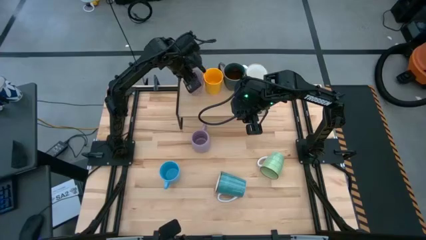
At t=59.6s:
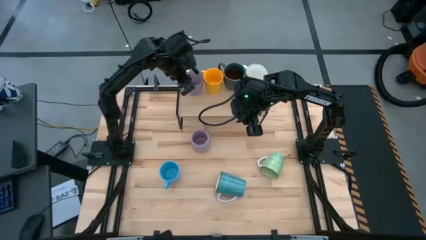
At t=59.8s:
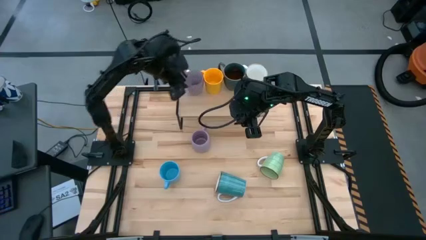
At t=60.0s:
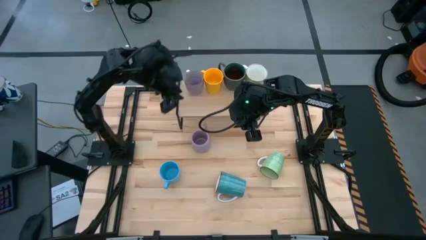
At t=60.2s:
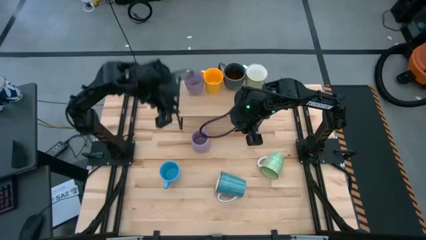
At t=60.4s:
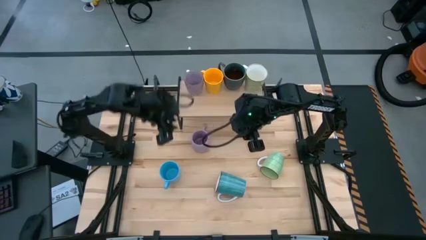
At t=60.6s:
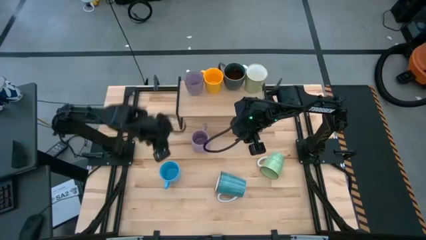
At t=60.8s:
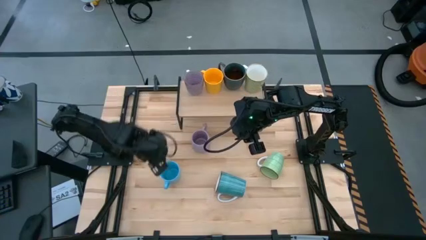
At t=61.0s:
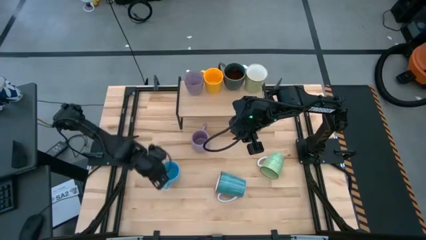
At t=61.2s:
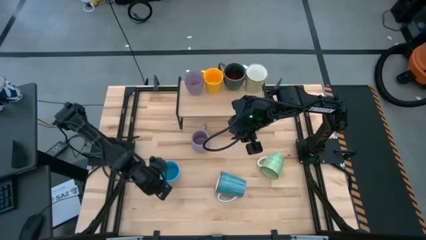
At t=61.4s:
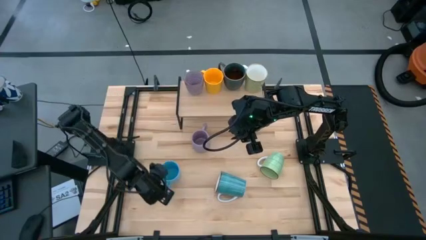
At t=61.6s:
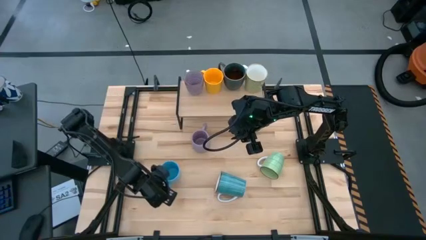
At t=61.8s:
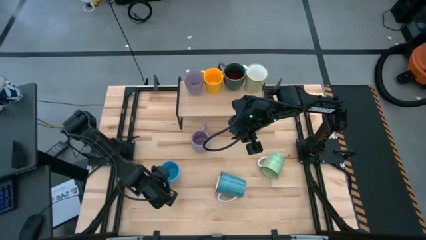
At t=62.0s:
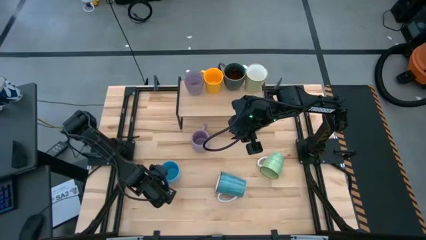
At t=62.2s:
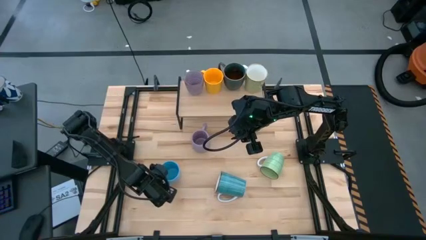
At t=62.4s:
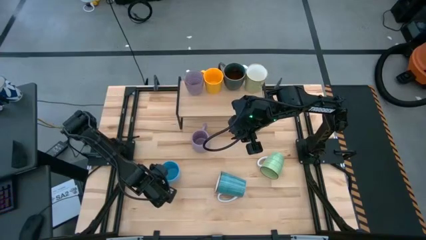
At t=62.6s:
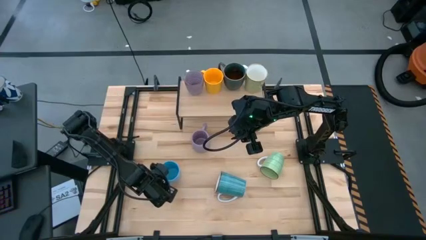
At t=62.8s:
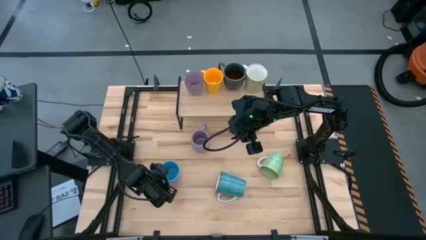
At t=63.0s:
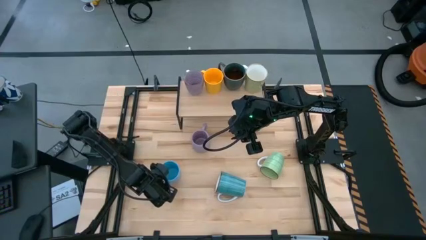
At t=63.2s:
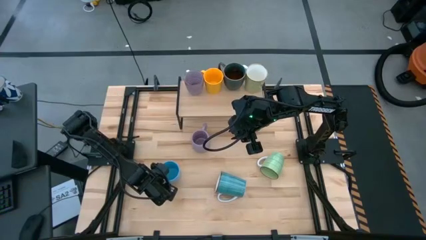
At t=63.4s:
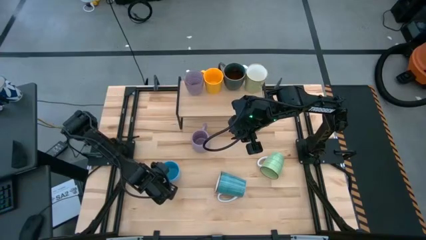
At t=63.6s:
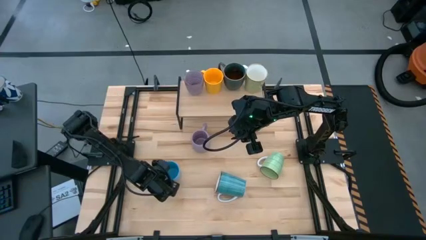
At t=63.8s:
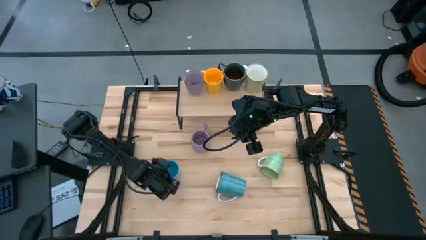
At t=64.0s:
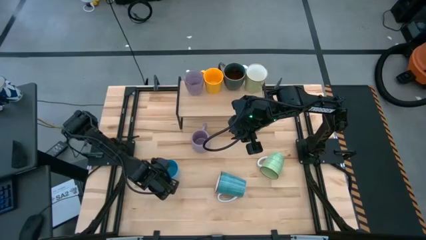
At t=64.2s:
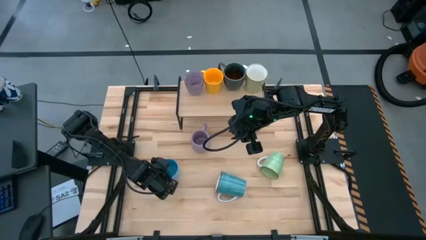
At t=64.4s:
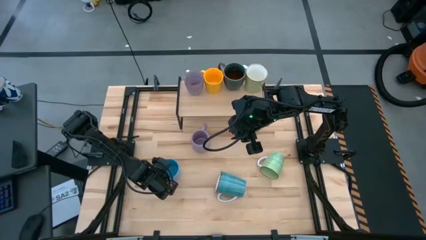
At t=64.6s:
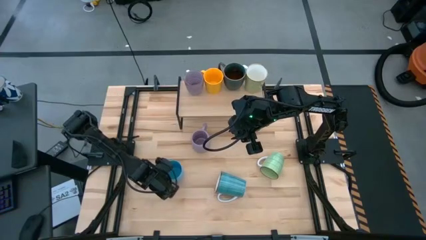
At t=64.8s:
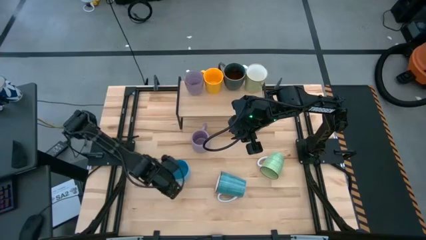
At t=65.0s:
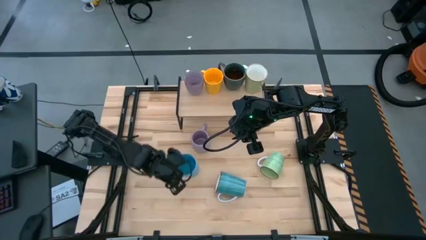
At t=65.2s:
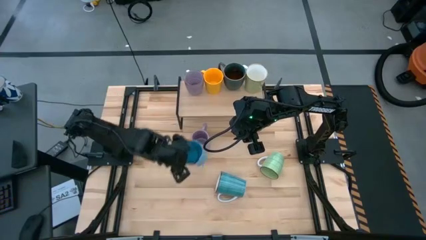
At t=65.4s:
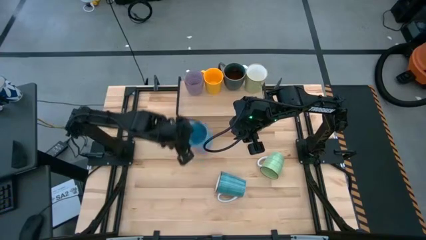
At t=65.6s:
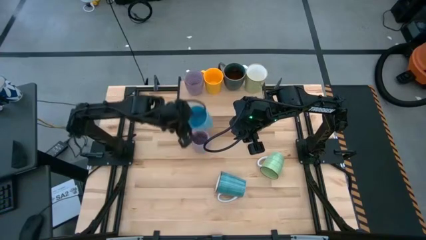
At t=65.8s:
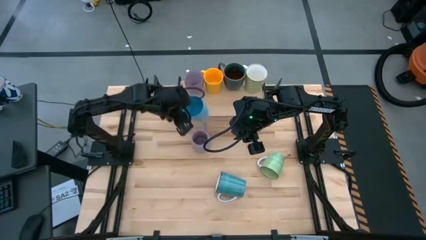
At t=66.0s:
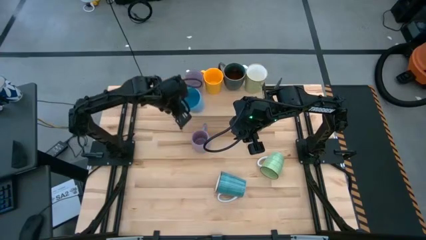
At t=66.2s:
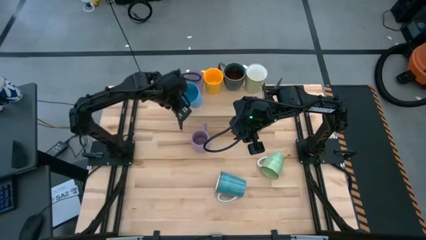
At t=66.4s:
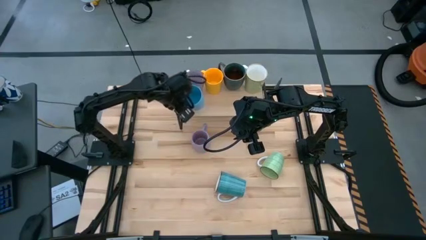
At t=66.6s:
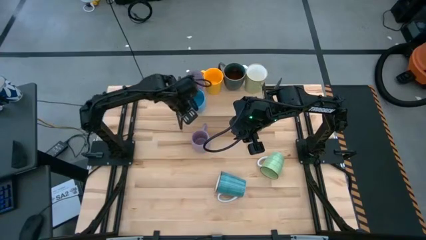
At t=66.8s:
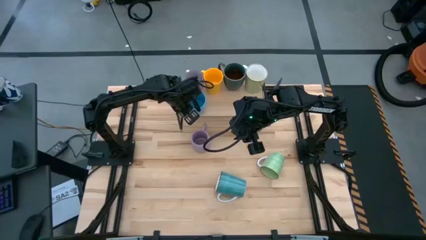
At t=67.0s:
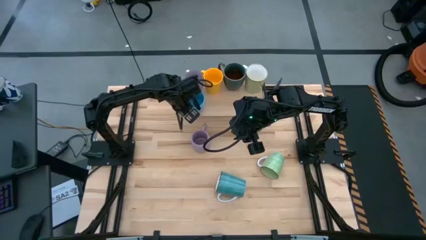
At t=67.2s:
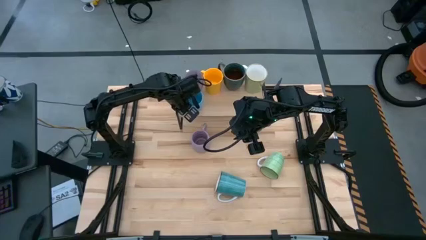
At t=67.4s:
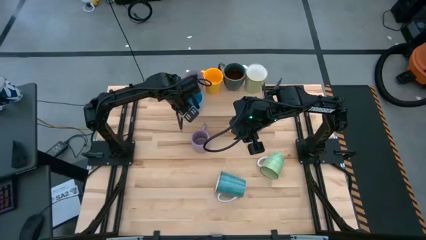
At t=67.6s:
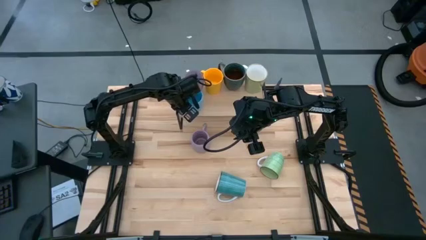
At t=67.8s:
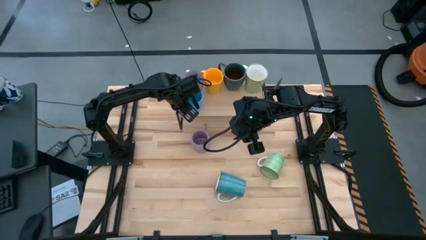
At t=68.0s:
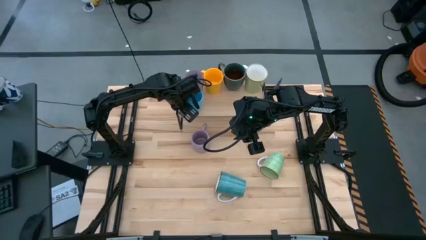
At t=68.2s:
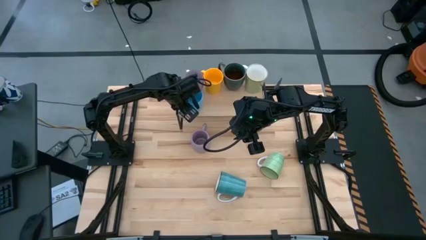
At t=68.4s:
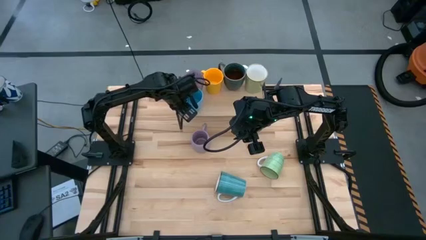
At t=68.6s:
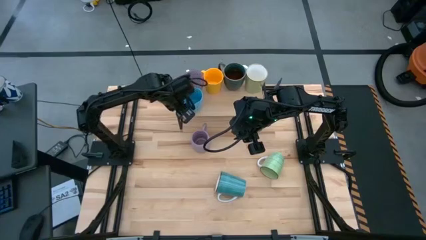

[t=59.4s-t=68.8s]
Task: Place coffee mugs
Put the light blue mug on the shelf
